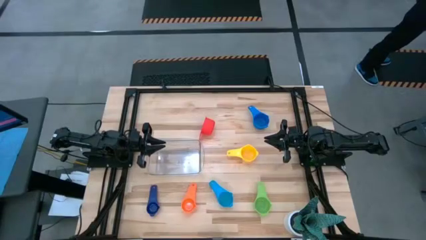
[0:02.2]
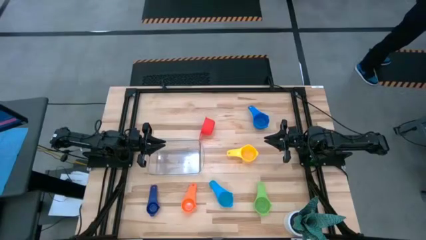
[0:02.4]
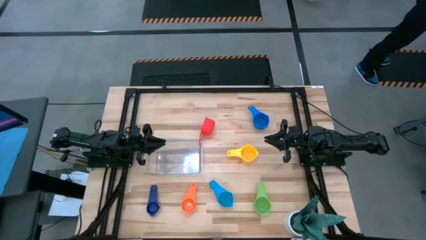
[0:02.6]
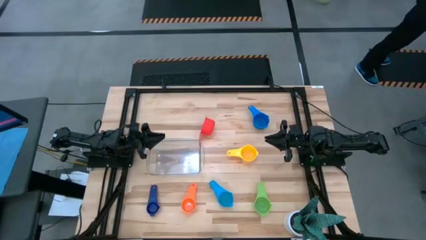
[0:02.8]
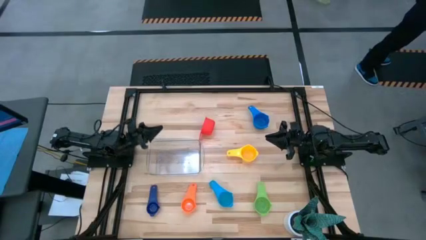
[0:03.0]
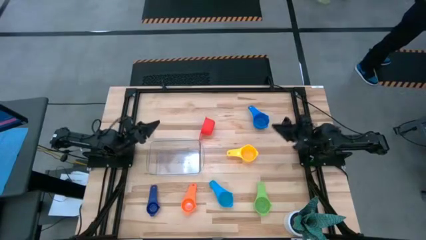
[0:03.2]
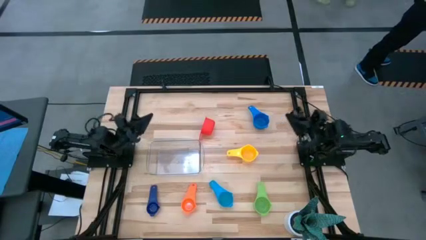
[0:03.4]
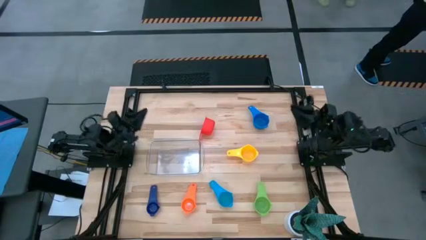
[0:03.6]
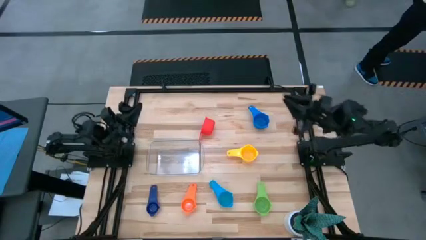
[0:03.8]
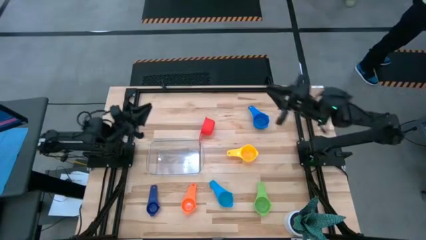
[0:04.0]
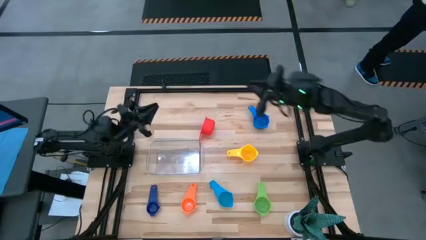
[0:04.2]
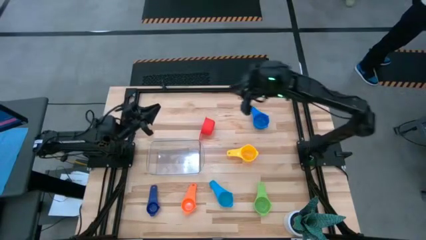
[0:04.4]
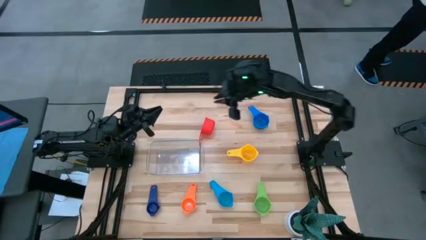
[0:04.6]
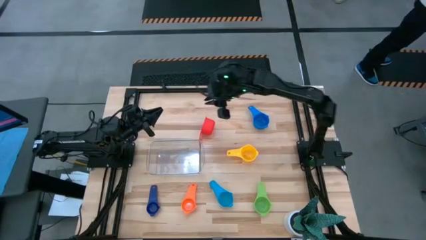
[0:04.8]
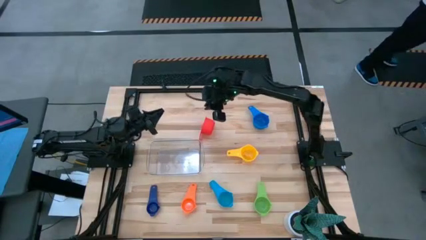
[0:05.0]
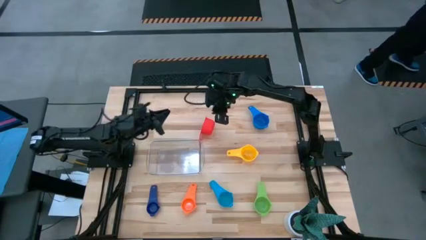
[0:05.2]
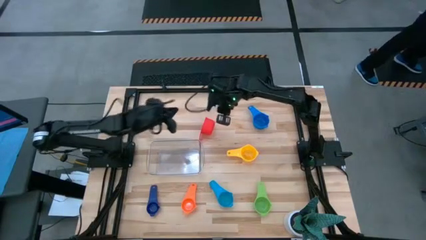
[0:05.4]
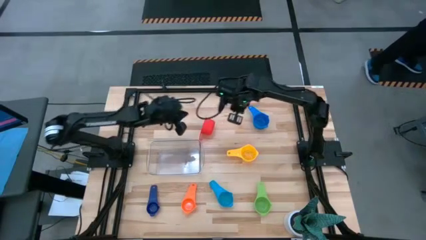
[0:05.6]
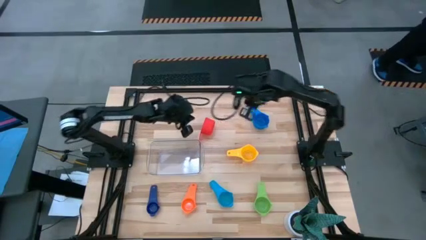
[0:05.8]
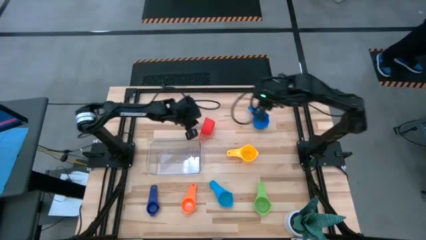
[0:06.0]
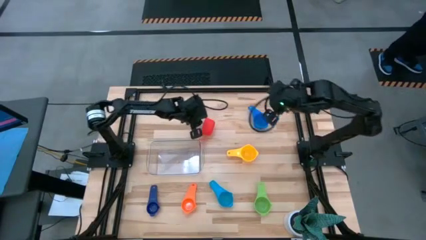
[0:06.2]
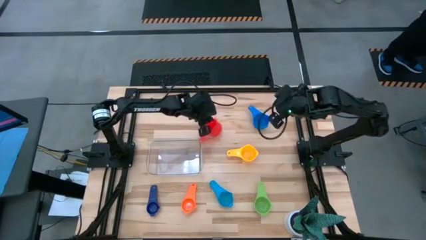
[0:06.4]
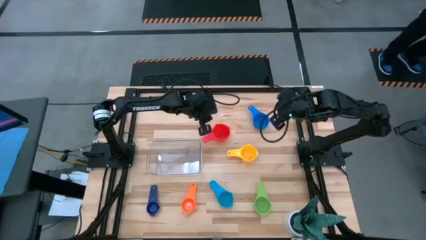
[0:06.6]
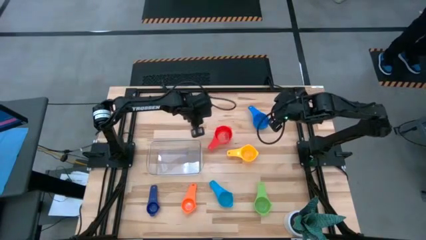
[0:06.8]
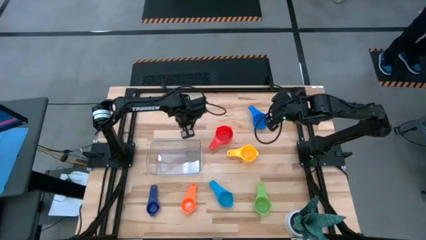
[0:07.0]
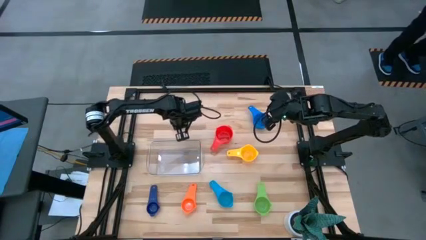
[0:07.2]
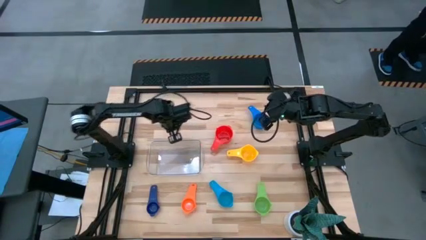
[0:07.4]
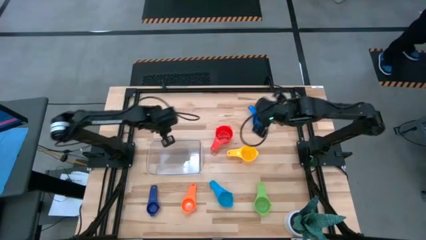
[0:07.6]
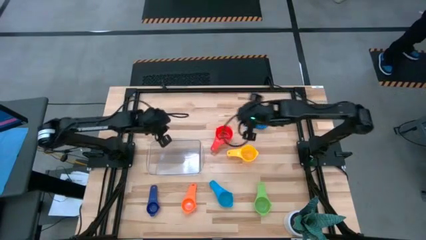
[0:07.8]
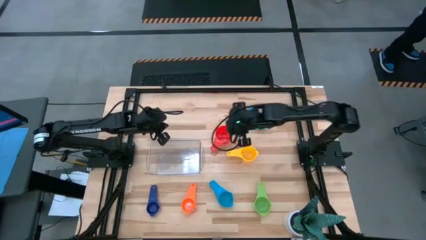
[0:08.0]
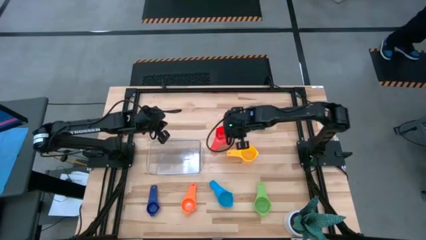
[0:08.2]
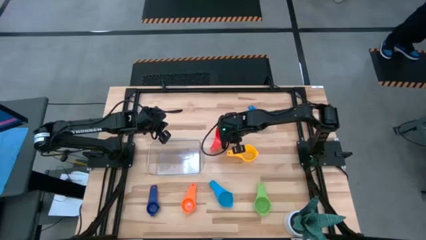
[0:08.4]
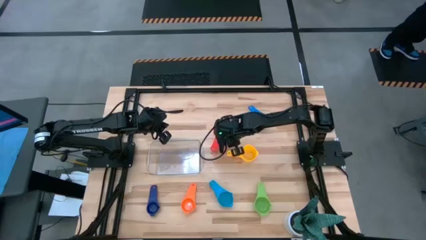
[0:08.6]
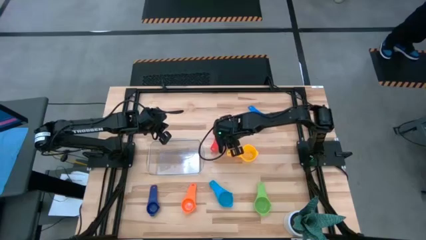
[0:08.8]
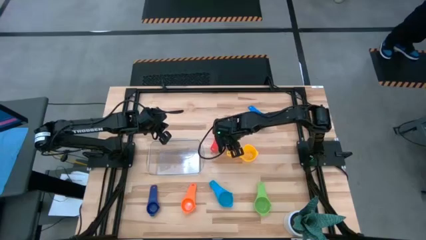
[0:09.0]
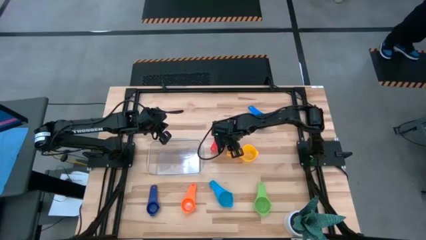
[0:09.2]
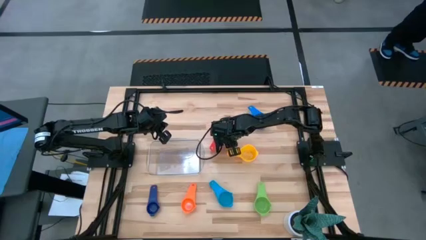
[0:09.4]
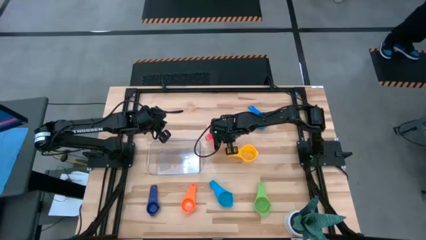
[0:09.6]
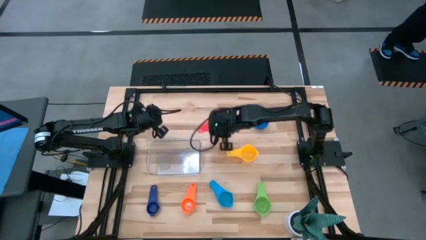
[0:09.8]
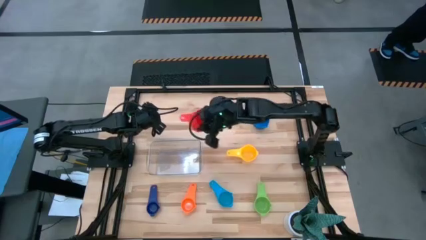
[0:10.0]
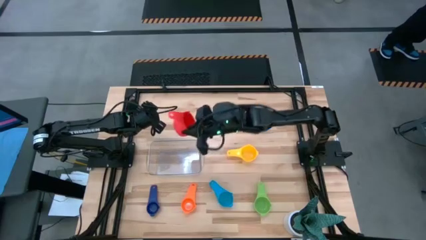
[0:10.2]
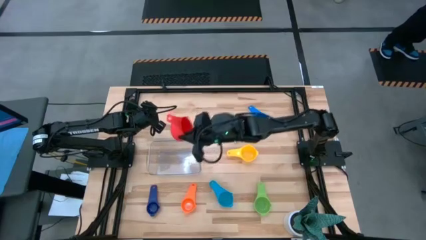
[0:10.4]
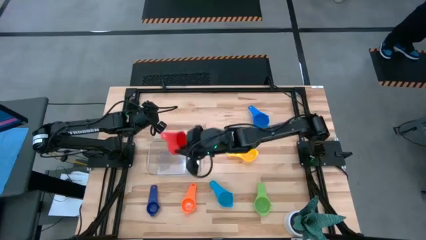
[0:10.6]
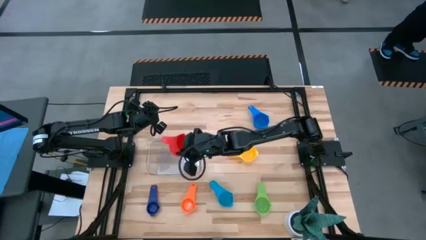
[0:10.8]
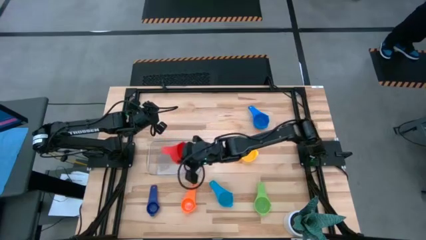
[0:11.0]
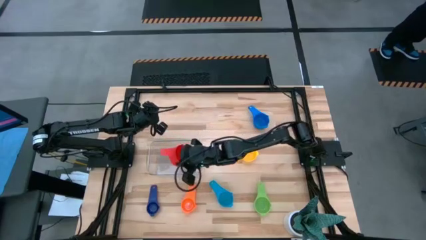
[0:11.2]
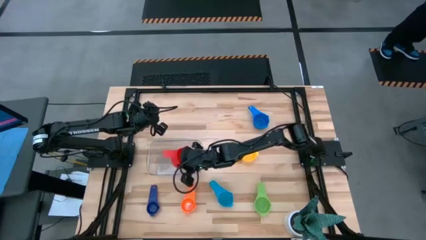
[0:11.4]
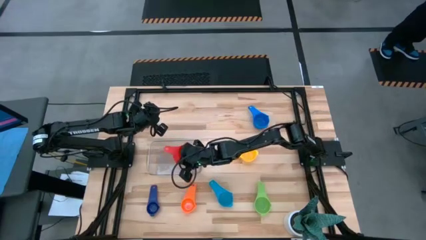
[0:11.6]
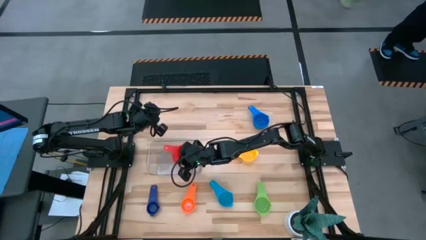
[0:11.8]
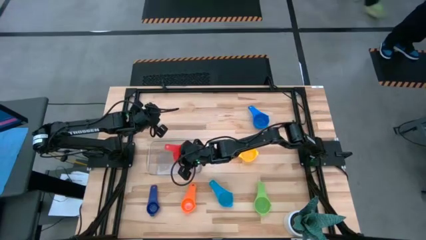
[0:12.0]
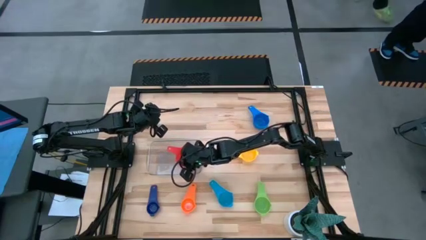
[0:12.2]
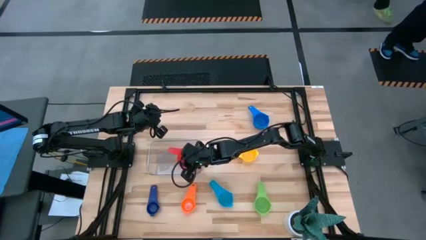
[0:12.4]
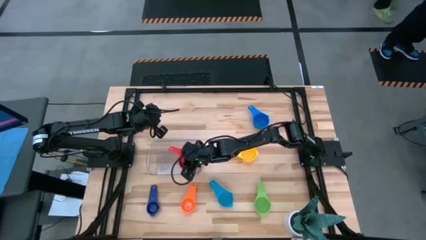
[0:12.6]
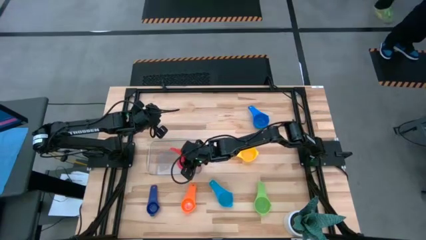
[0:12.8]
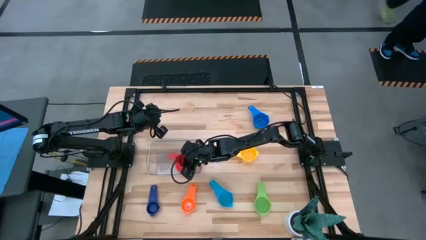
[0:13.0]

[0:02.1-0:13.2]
Task: Nest measuring cups in basket
Put the red measuring cup into the transparent bin
